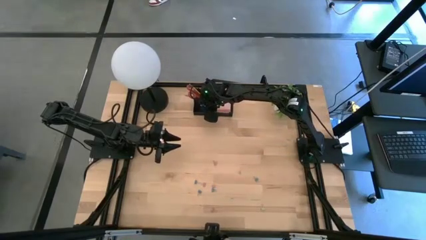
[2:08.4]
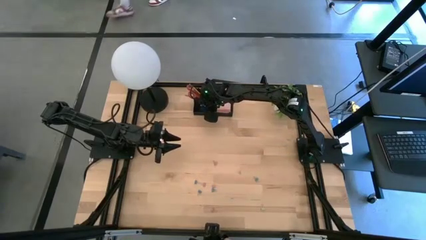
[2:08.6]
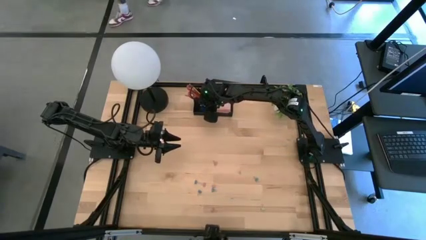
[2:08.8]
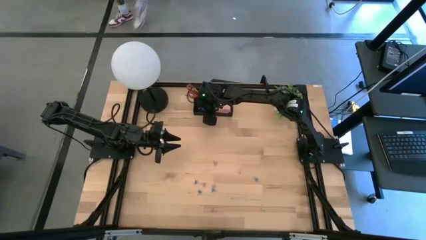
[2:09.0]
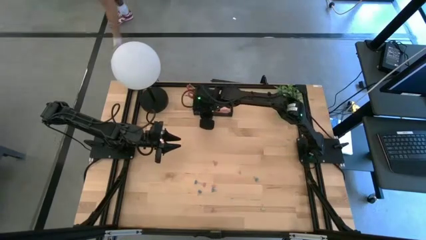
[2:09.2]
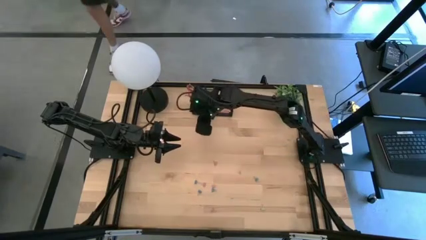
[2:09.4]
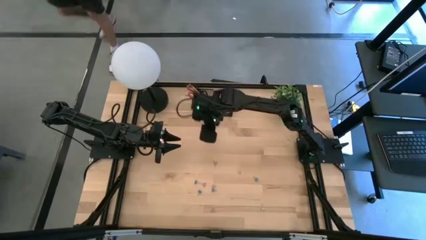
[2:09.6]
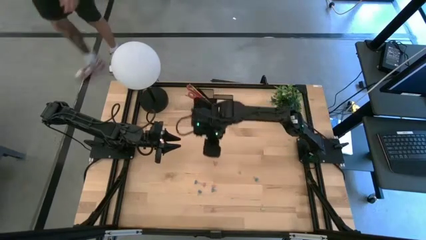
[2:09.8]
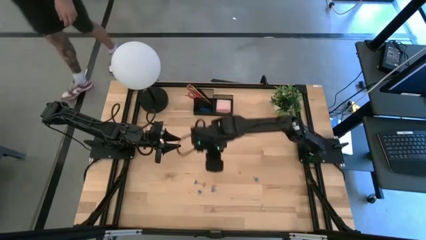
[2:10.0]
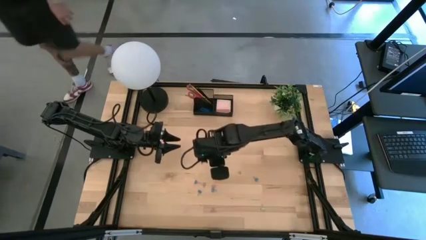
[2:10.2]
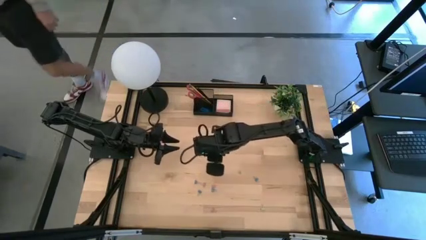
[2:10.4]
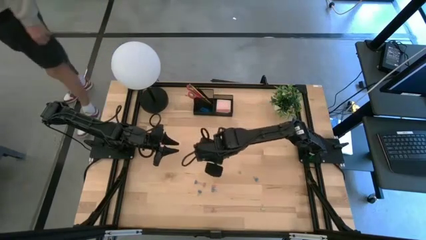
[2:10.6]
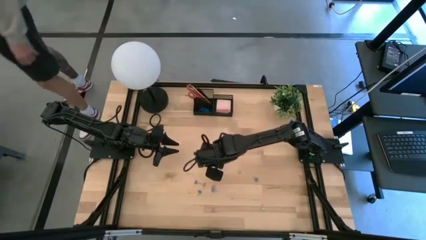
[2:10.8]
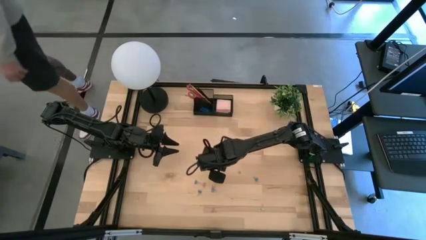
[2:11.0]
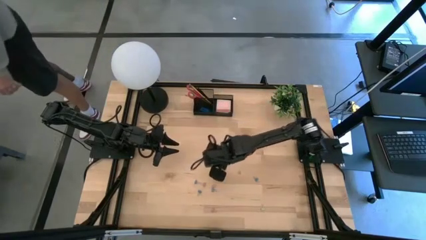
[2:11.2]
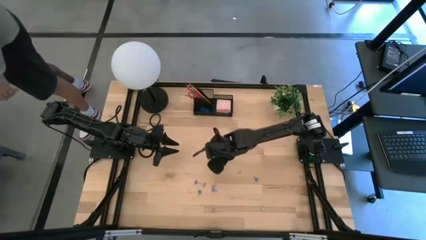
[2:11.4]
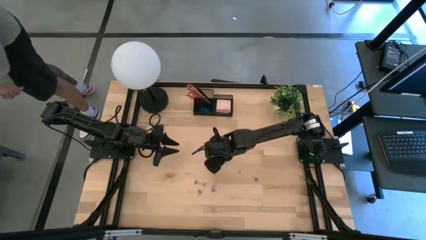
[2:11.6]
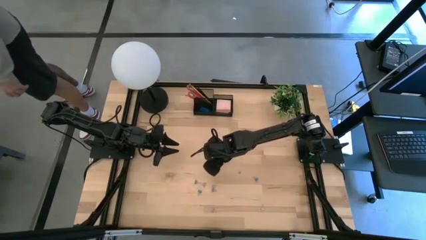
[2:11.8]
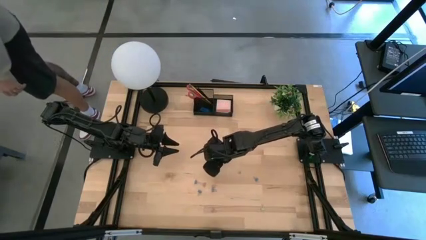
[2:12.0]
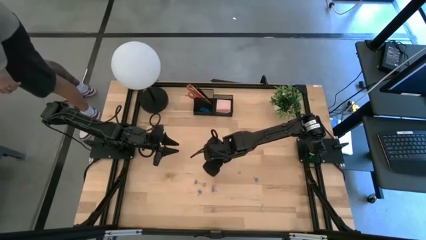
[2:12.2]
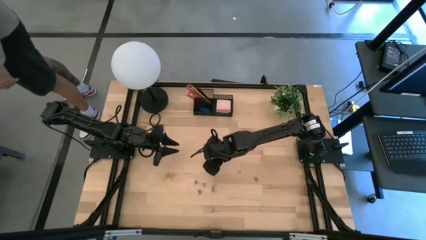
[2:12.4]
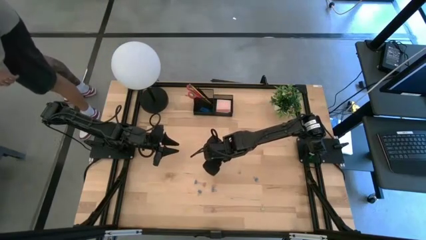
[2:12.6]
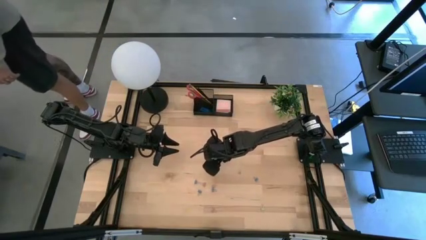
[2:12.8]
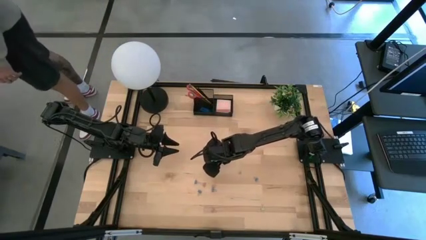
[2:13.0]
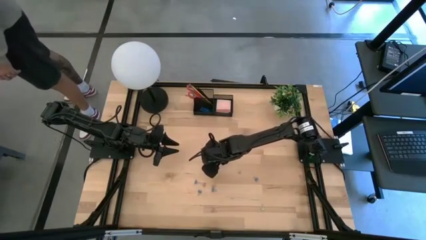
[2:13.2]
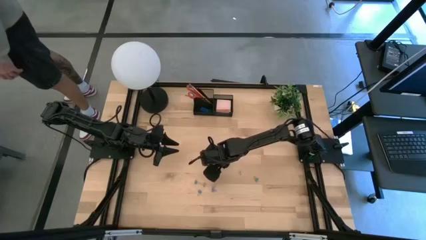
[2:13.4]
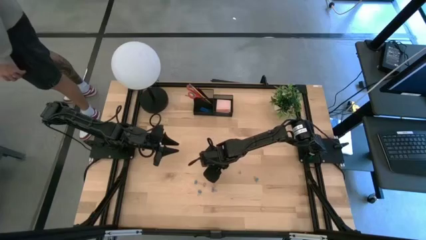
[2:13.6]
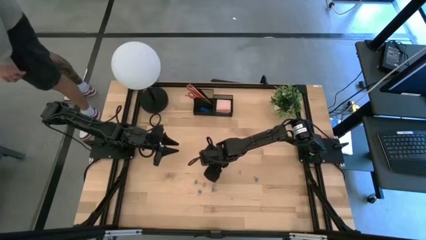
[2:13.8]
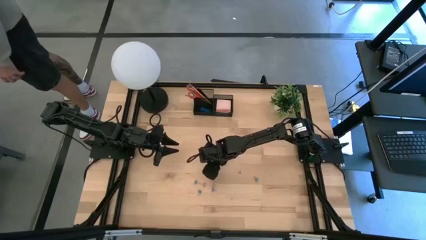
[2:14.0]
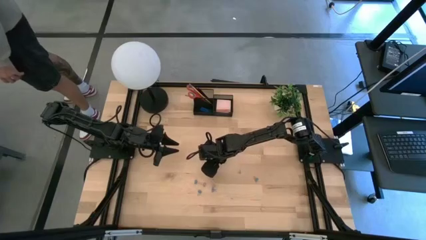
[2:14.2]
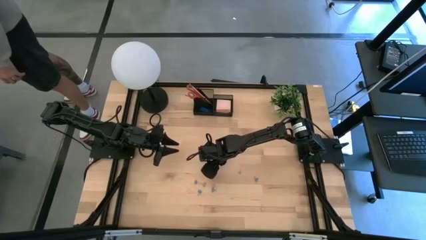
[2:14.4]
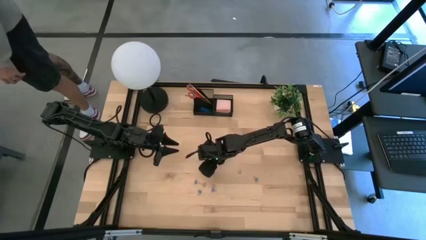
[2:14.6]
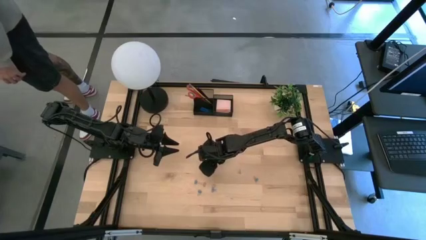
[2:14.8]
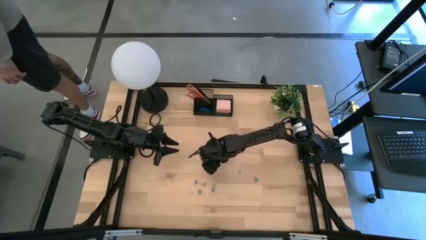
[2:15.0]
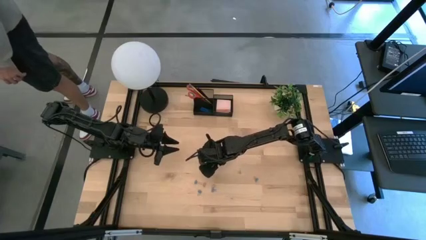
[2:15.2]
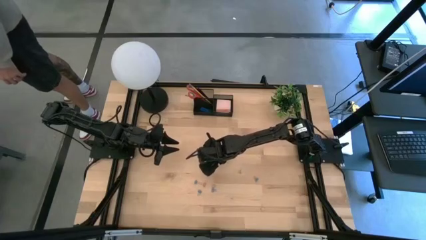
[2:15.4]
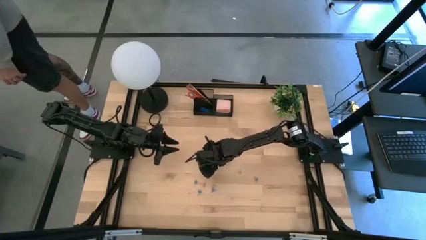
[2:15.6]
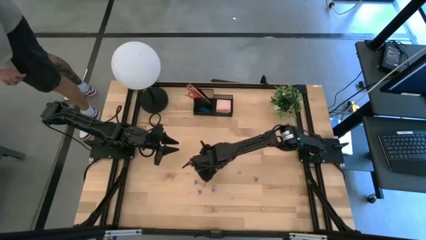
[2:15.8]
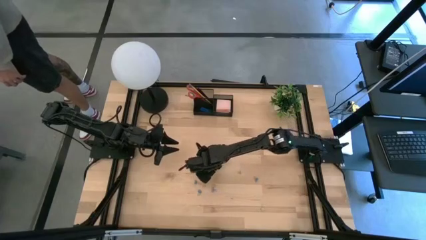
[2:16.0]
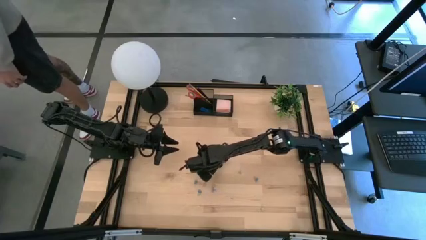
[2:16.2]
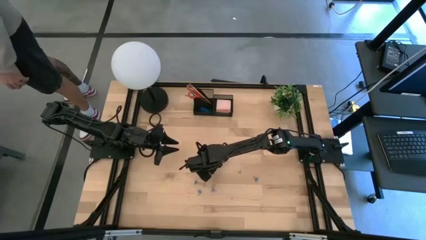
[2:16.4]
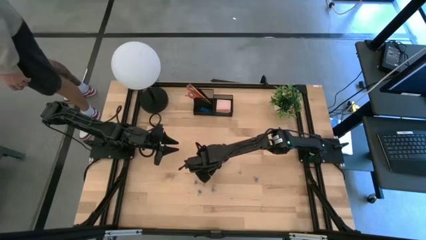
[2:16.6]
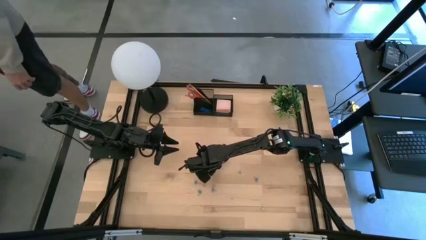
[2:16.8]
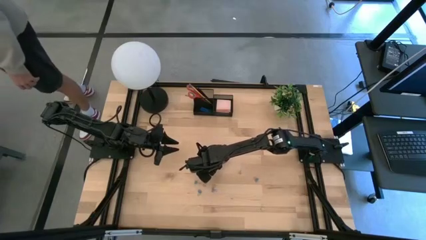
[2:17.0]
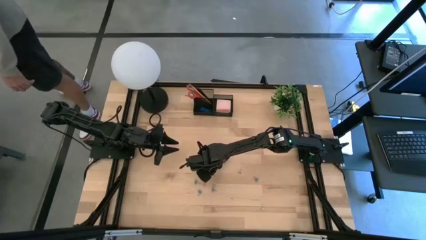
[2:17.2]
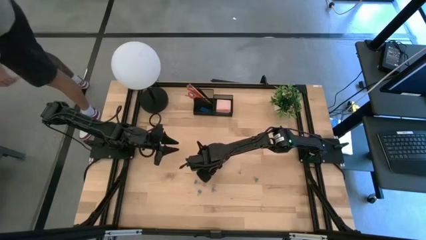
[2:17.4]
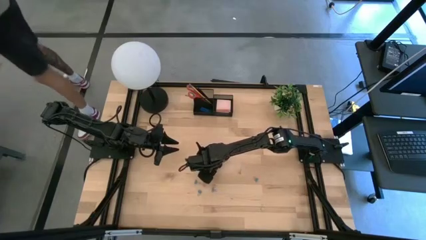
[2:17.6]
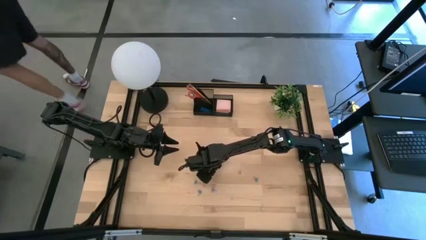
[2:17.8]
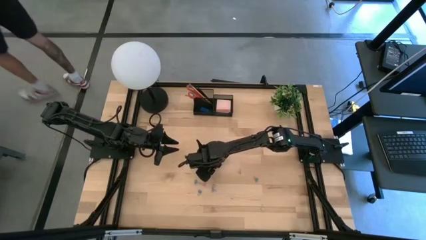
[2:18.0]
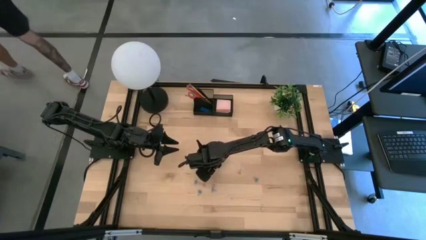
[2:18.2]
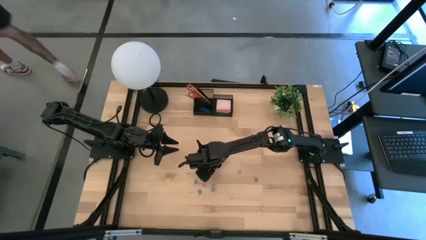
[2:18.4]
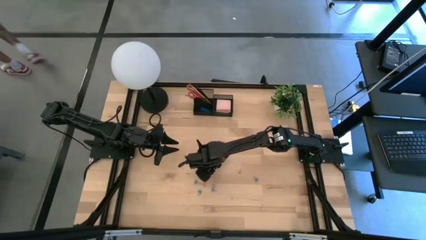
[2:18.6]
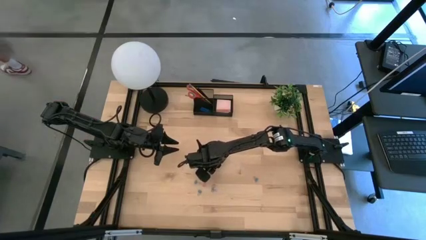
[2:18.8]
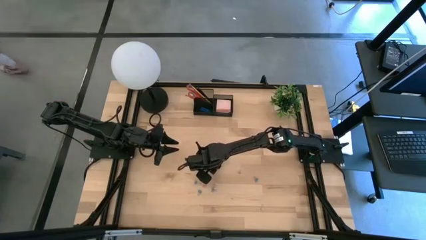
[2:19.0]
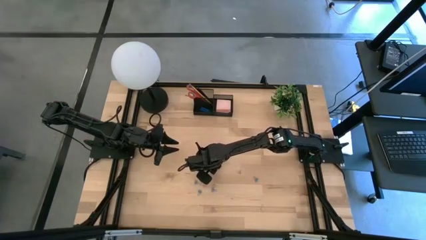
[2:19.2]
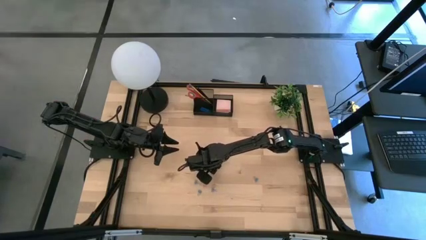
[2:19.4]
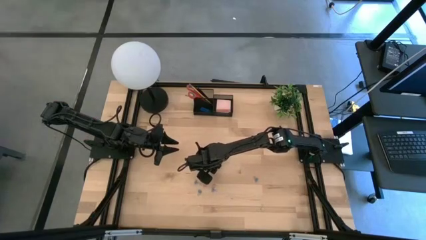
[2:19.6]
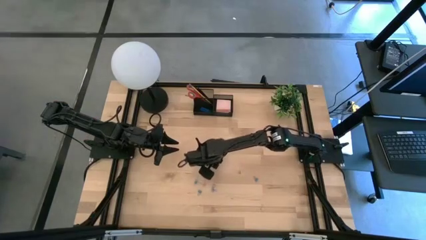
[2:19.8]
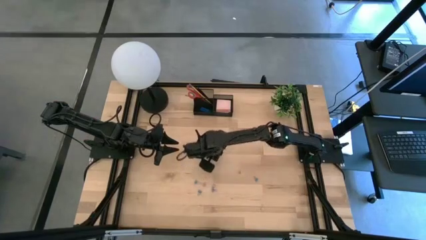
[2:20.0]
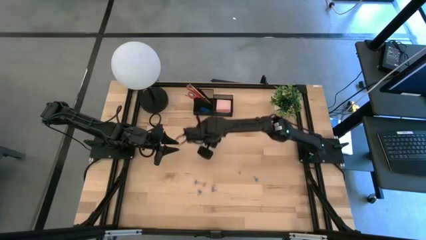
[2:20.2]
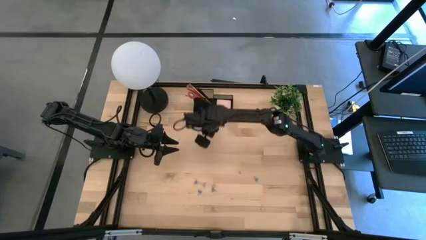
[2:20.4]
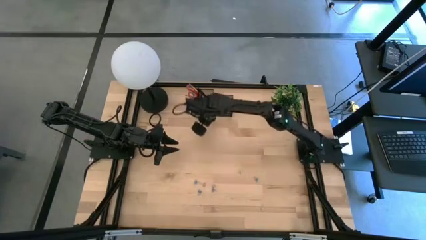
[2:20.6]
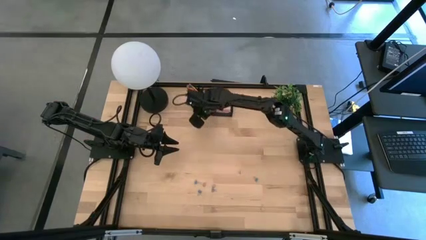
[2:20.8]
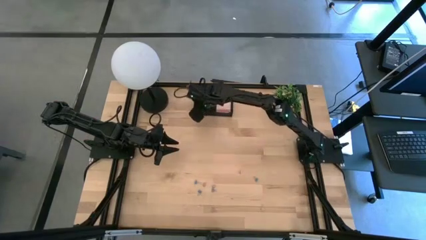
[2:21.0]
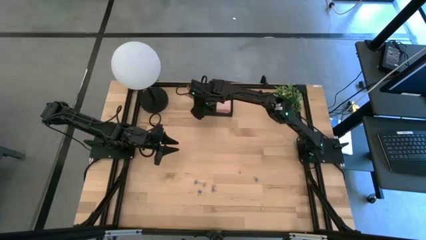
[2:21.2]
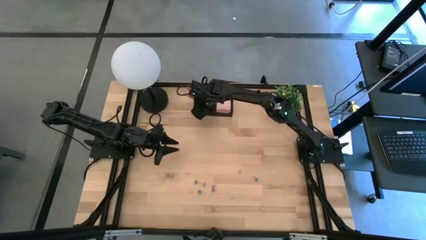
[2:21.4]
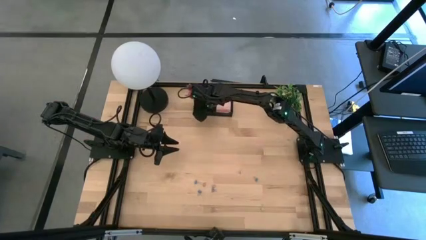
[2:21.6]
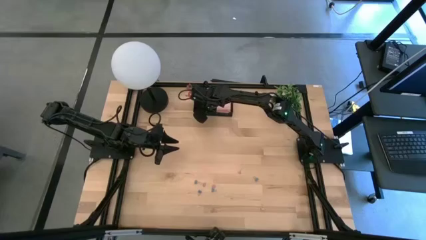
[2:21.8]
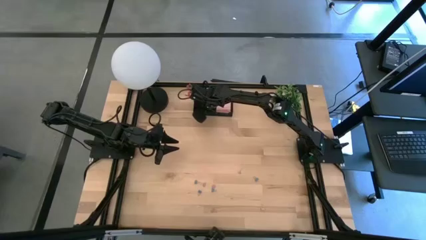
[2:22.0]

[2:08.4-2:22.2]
Task: Pick and place office supplies into organizer
Put the pink binder clip into the black desk organizer
